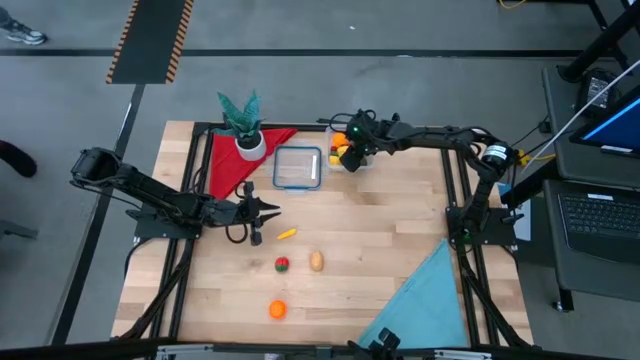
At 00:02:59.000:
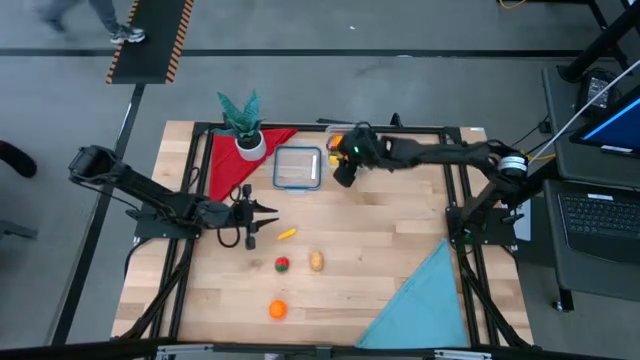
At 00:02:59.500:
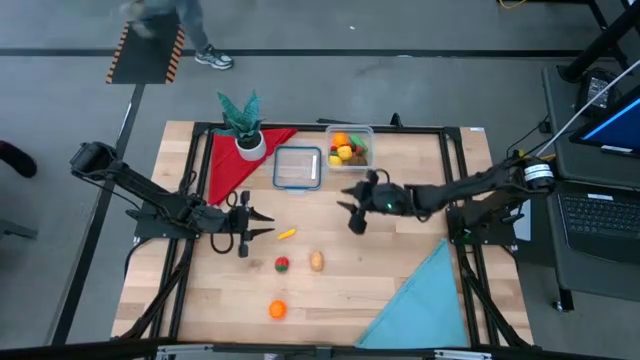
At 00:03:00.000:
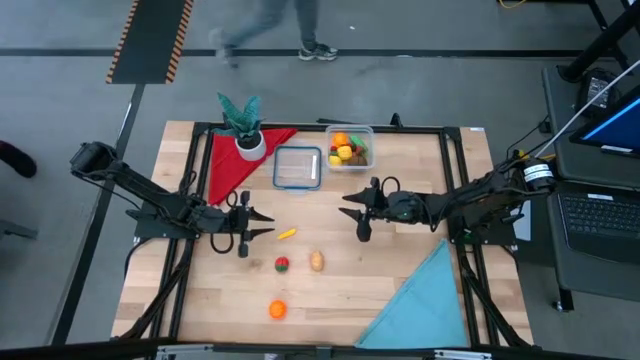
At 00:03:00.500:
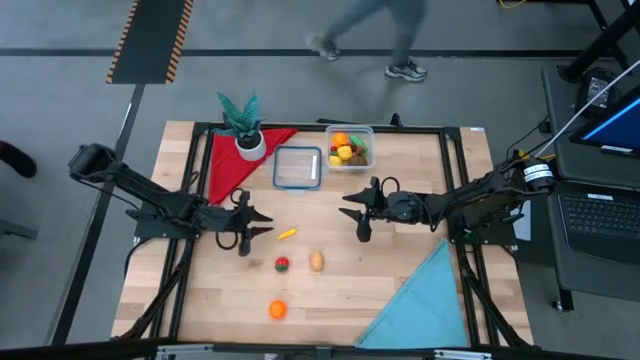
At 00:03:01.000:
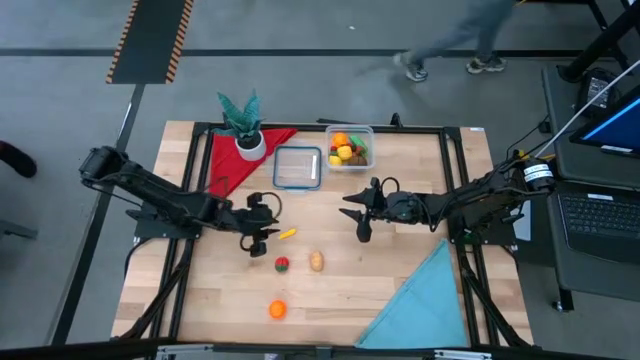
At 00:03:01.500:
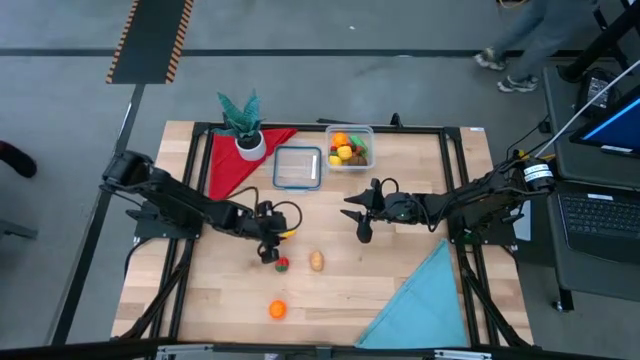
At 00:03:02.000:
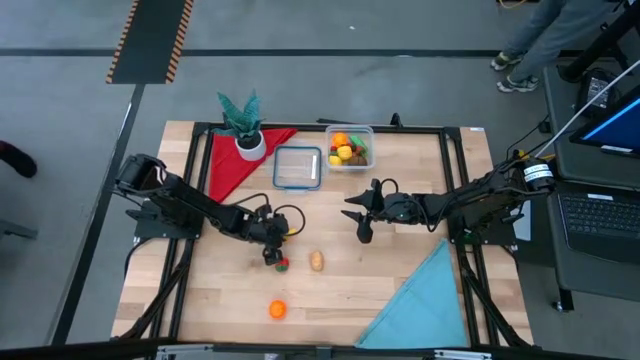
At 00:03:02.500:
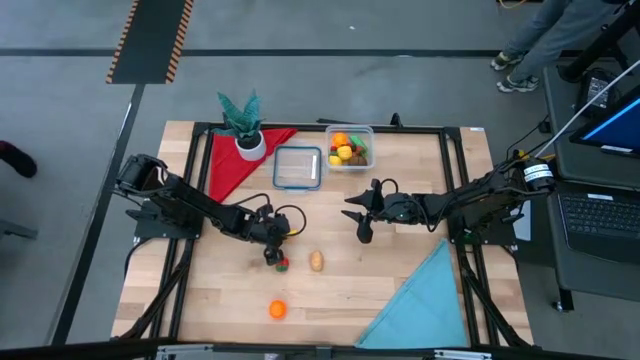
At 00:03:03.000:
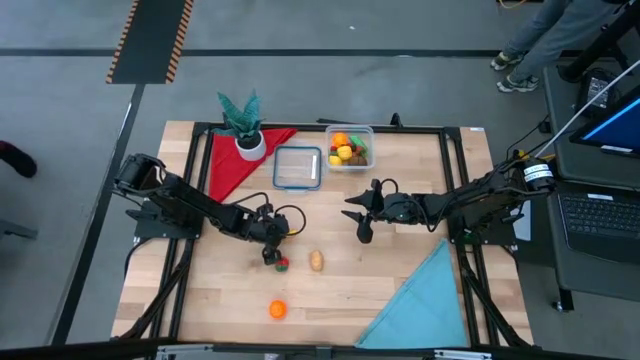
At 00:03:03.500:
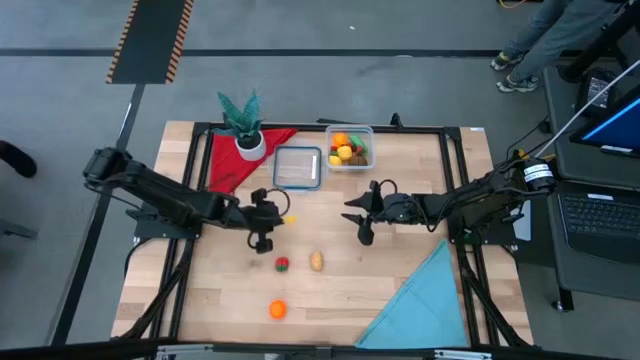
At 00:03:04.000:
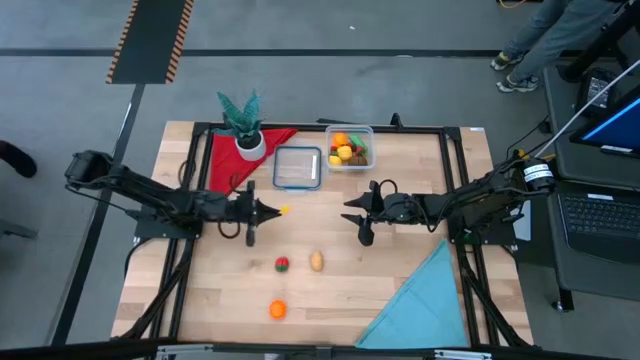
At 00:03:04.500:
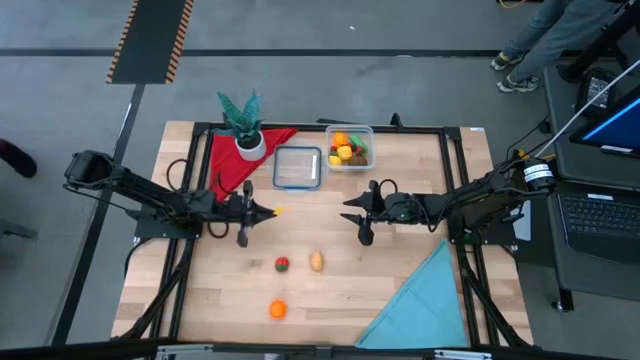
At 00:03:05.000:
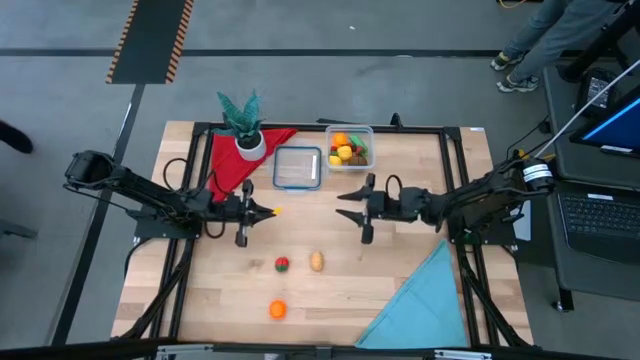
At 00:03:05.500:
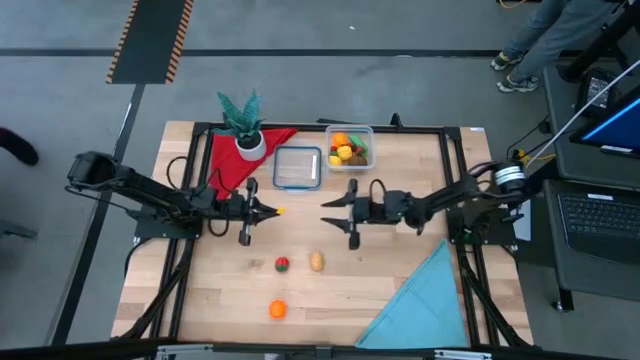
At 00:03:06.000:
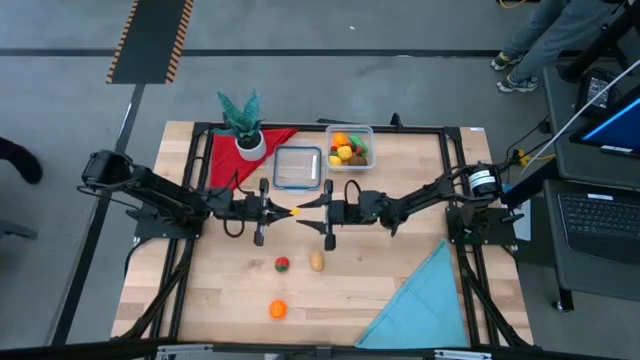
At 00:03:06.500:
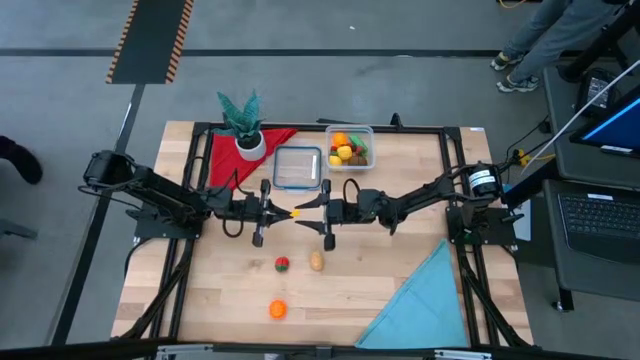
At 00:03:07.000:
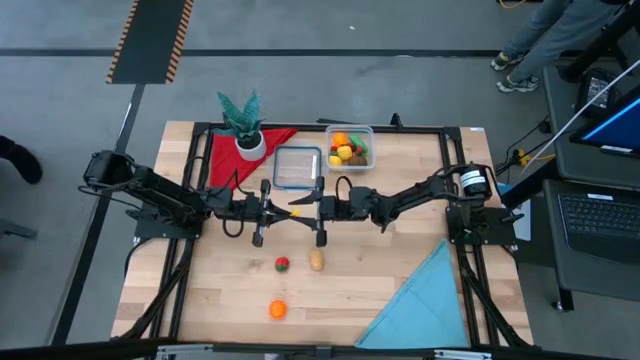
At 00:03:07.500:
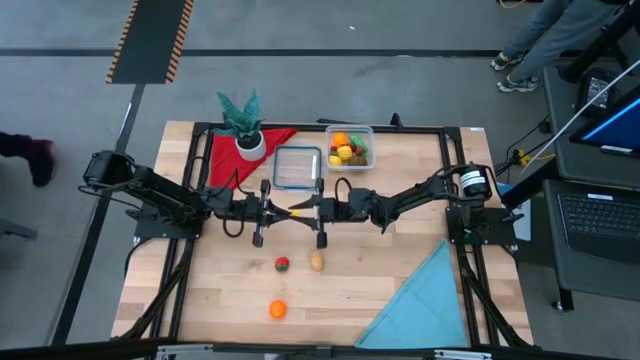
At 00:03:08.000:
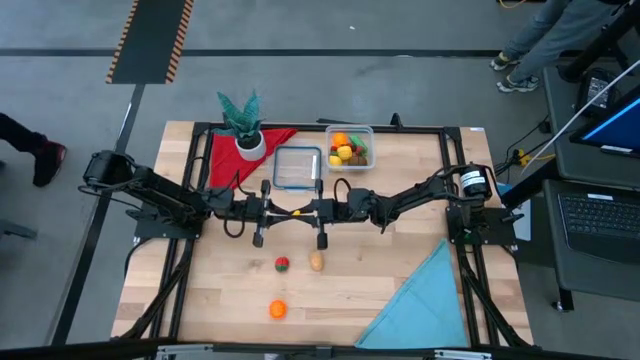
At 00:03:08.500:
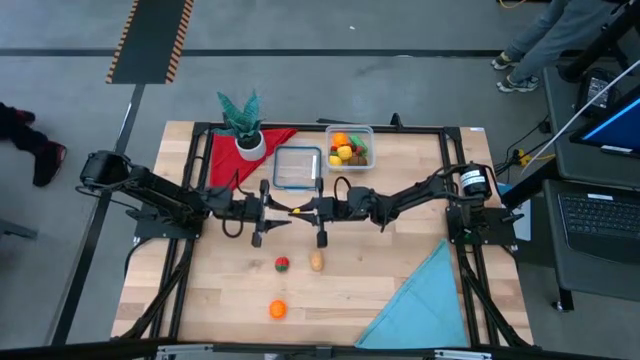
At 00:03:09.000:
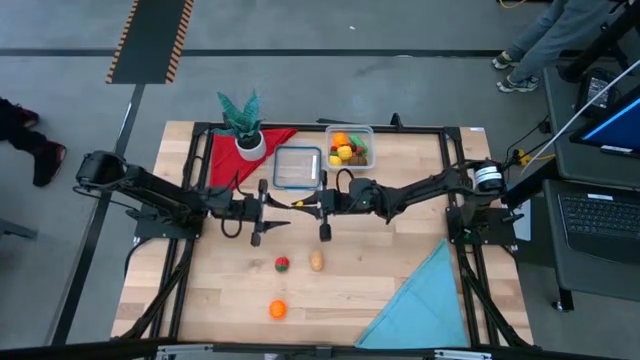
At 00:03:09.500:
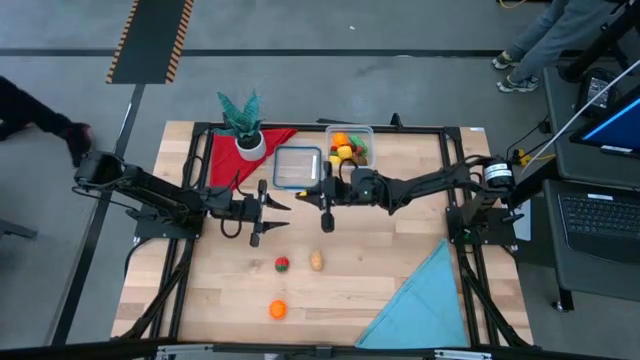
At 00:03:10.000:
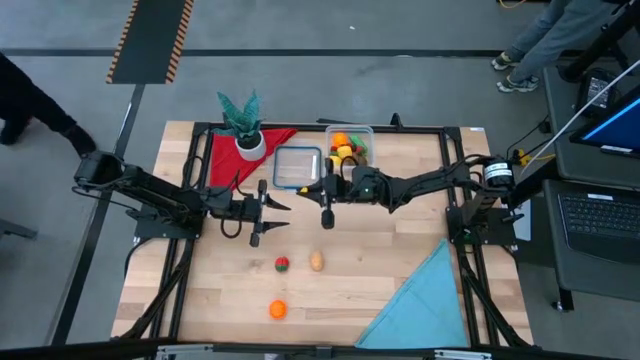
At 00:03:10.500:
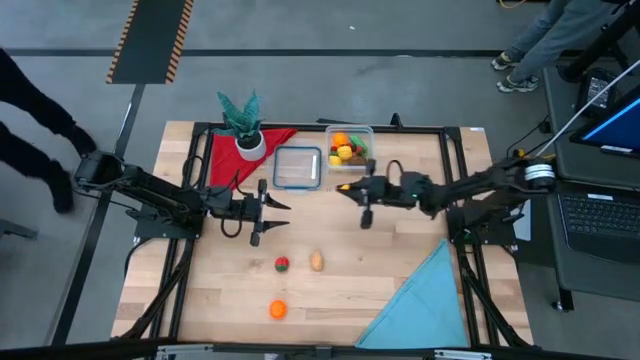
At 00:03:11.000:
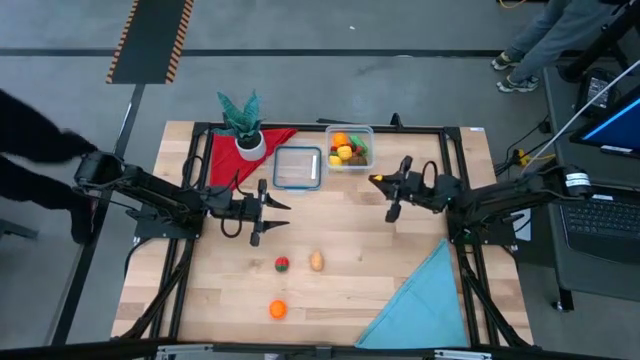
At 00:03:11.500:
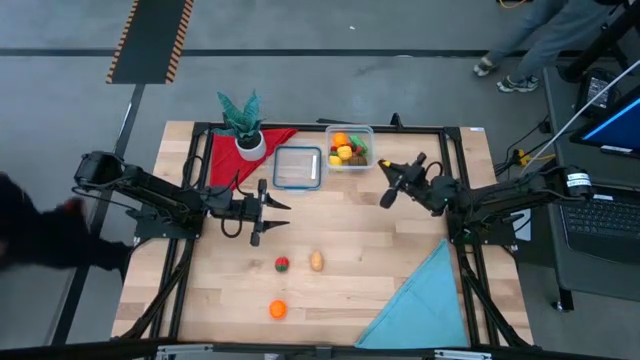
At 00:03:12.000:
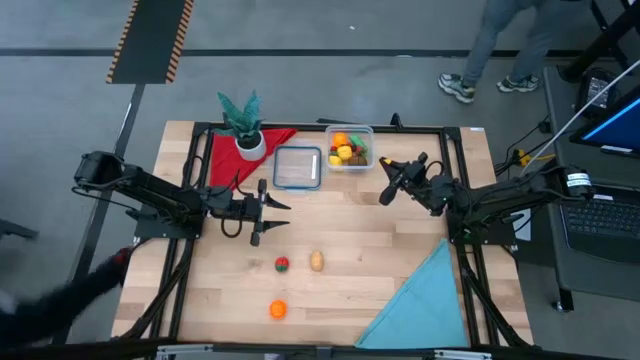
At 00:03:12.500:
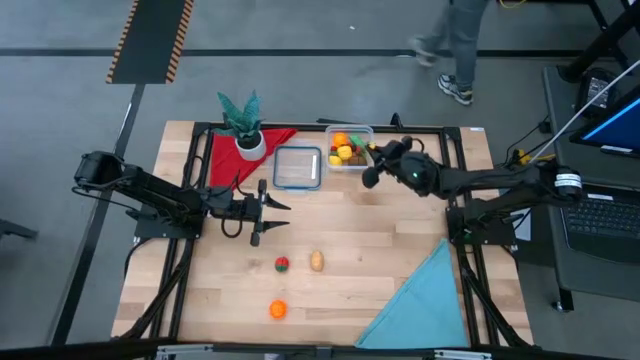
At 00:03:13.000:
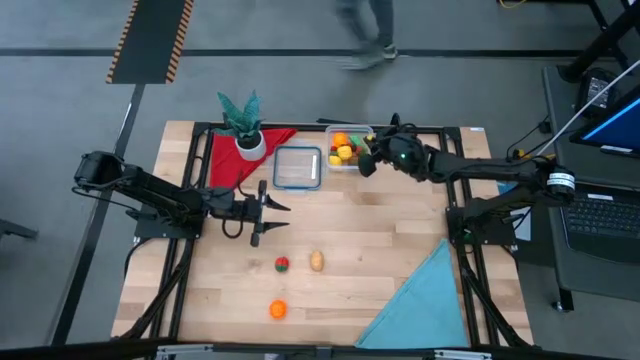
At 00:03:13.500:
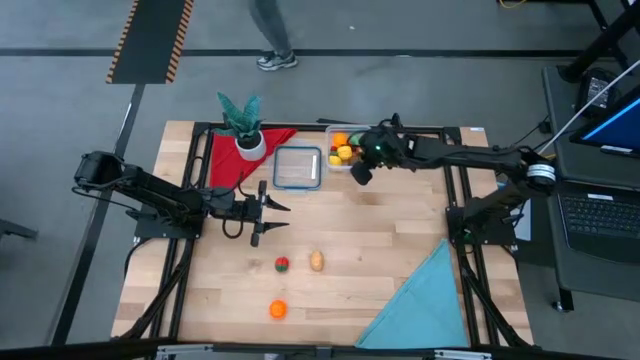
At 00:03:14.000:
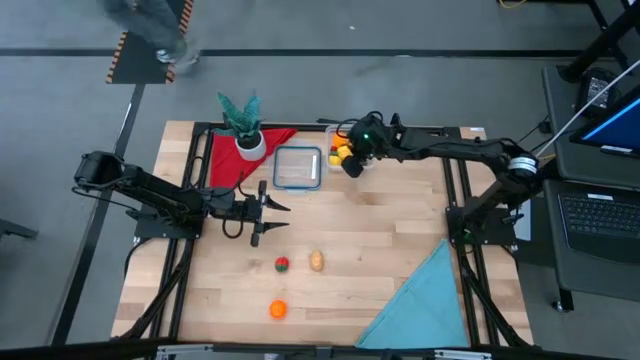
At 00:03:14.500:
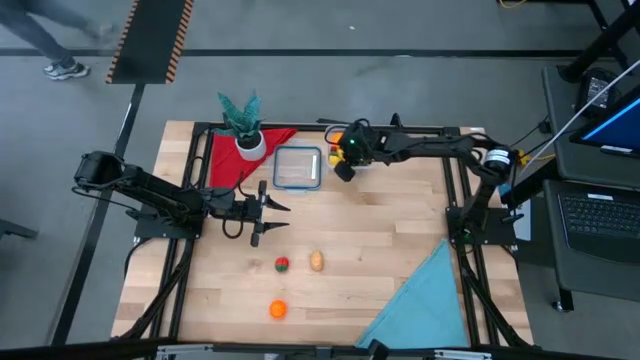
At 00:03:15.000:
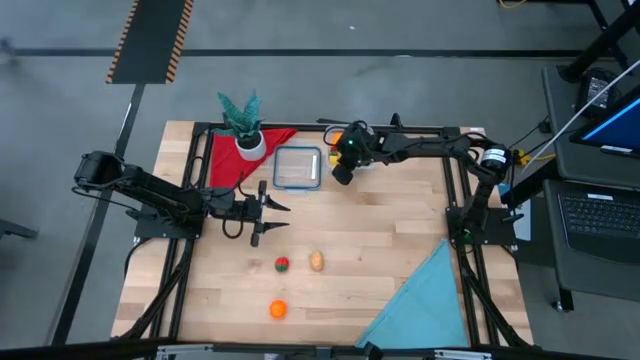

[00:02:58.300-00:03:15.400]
Task: Pick and placing Produce into tupperware
Put the yellow squash into the transparent bin

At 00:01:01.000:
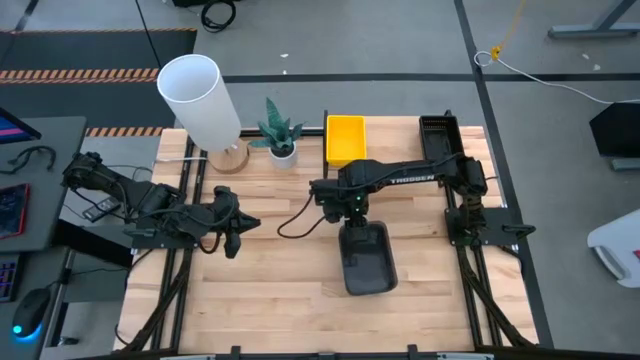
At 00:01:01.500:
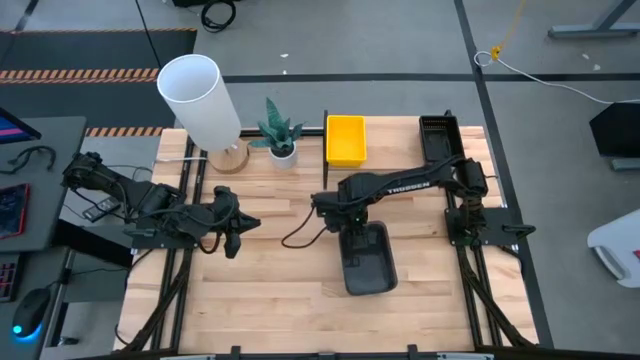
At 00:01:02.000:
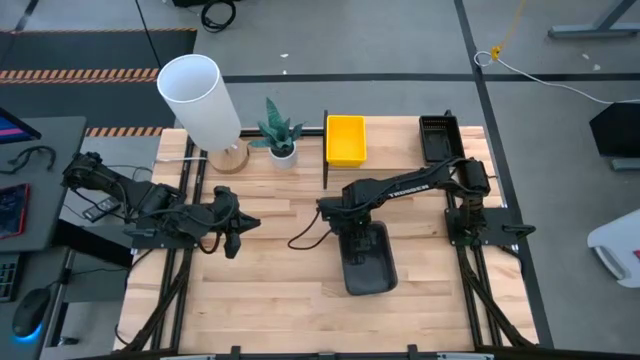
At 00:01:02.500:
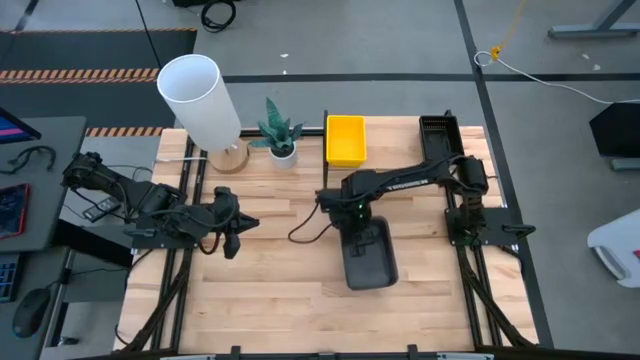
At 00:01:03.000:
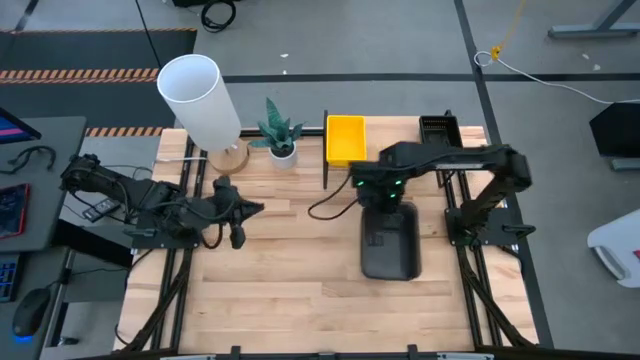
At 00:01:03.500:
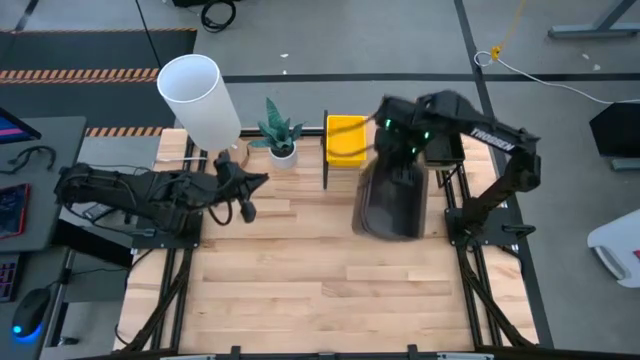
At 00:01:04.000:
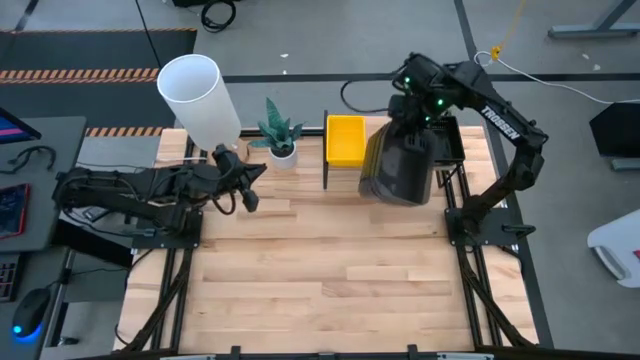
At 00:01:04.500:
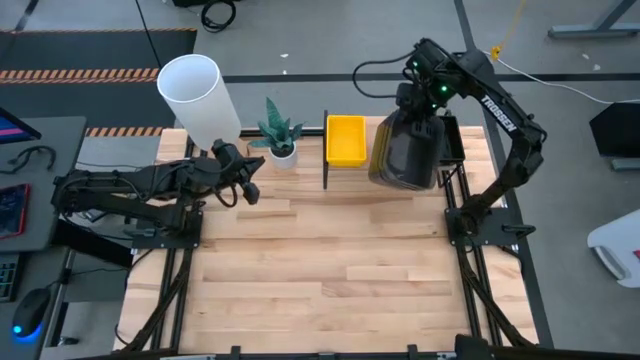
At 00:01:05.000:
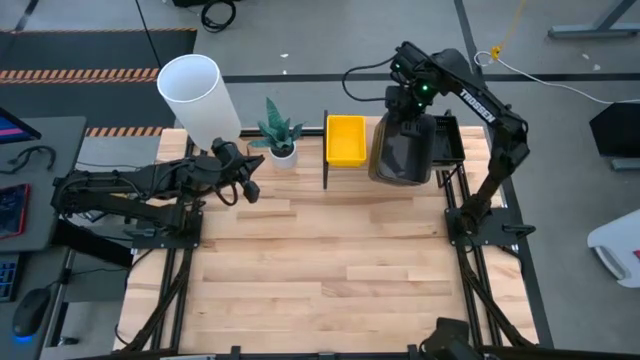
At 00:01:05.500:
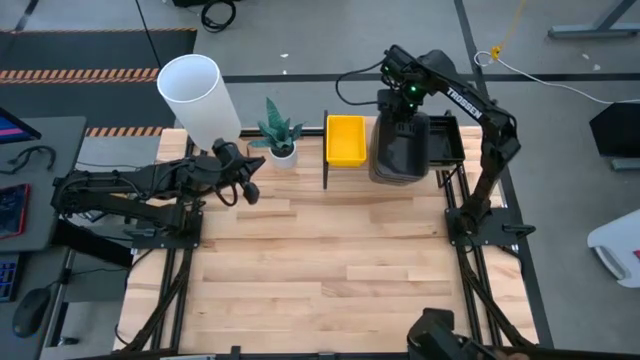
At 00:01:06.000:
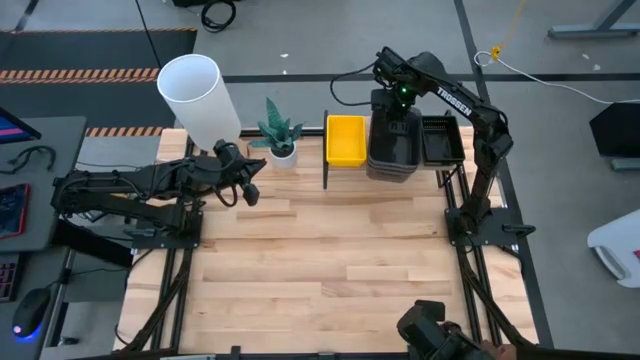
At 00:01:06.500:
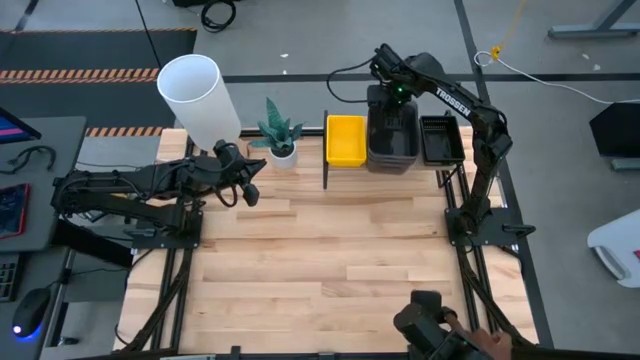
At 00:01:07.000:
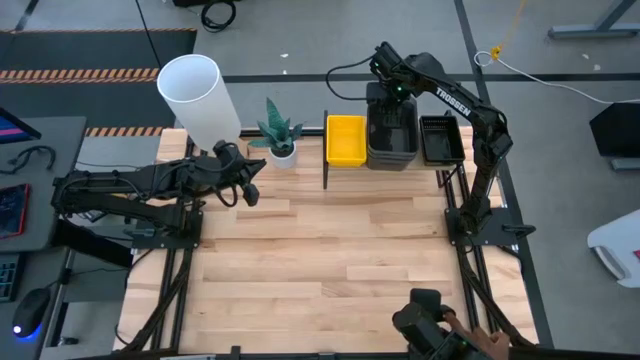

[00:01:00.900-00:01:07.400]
Task: Stack baskets on shelf by color
Put the stacked gray bins on the shelf
